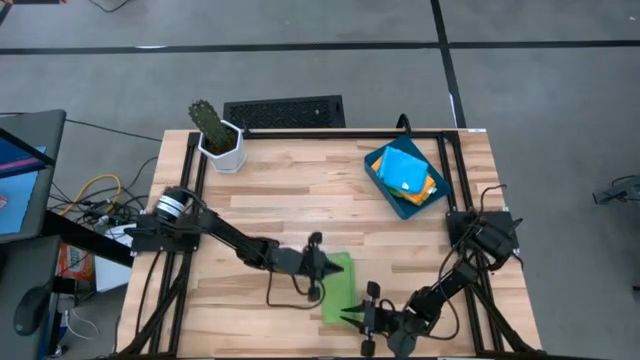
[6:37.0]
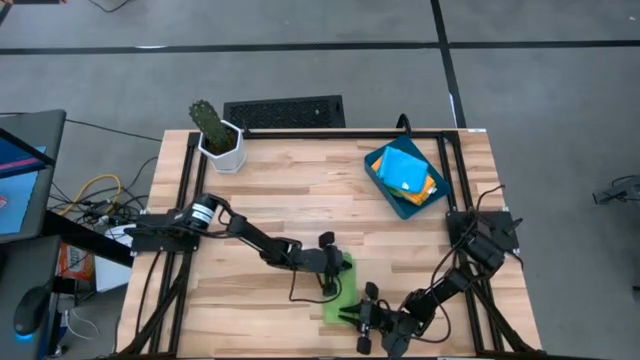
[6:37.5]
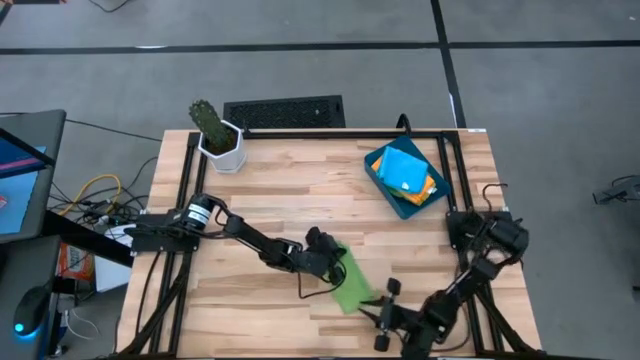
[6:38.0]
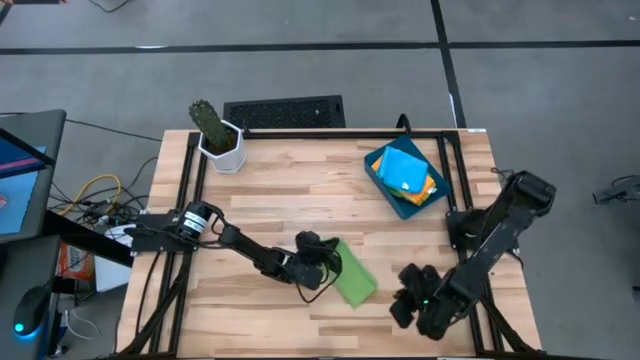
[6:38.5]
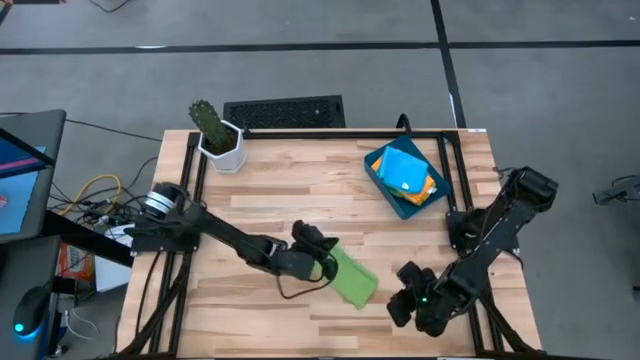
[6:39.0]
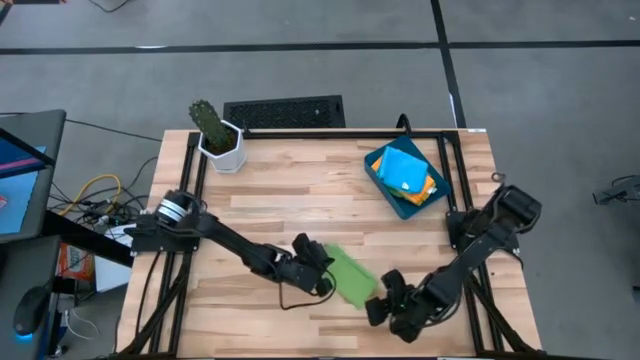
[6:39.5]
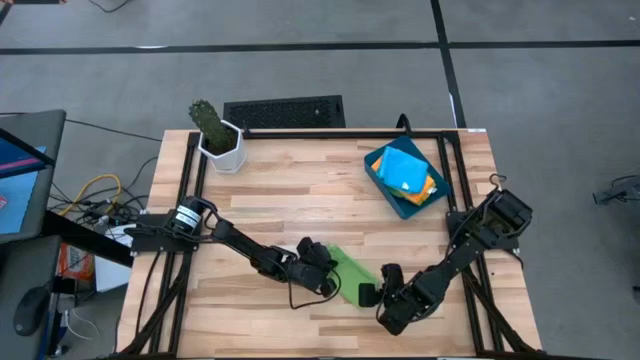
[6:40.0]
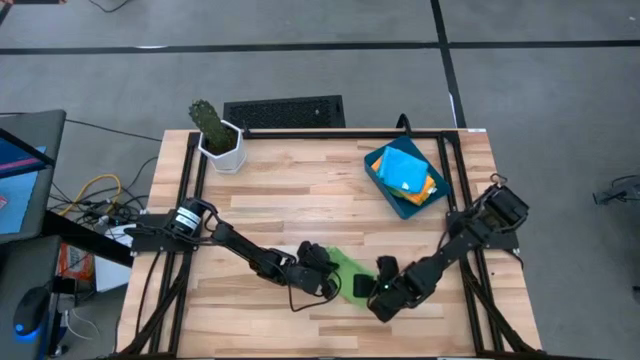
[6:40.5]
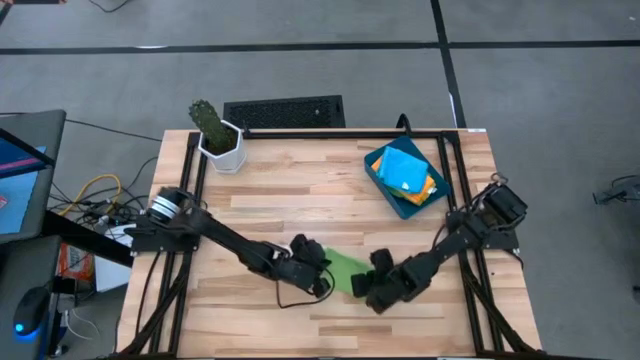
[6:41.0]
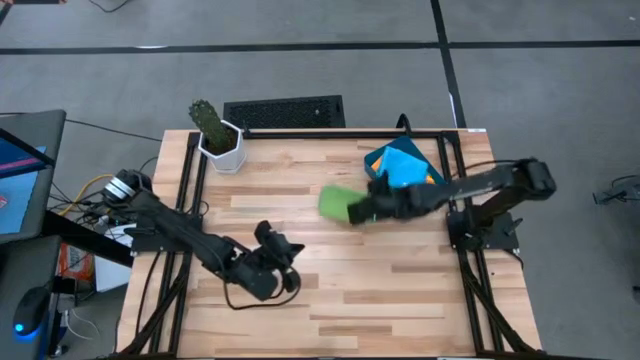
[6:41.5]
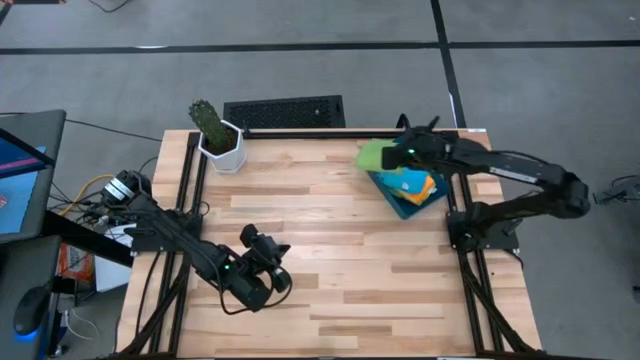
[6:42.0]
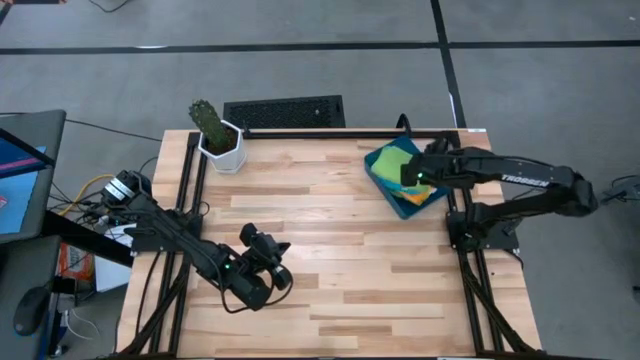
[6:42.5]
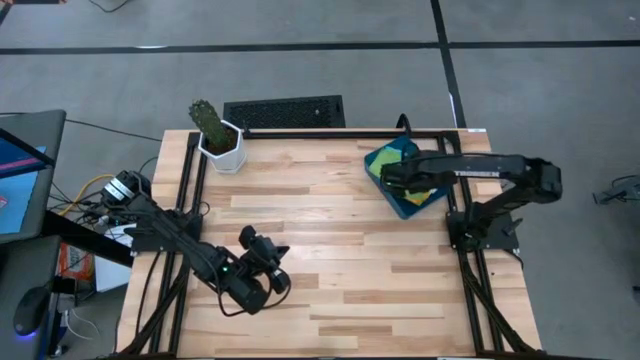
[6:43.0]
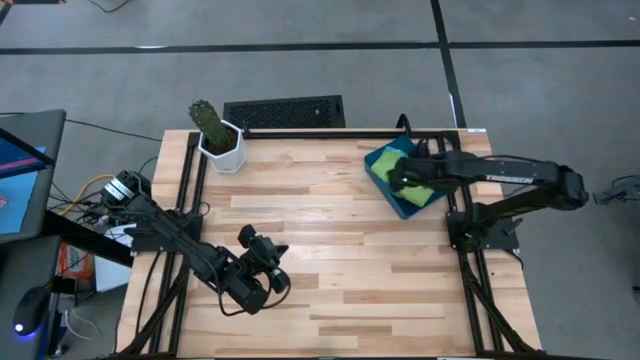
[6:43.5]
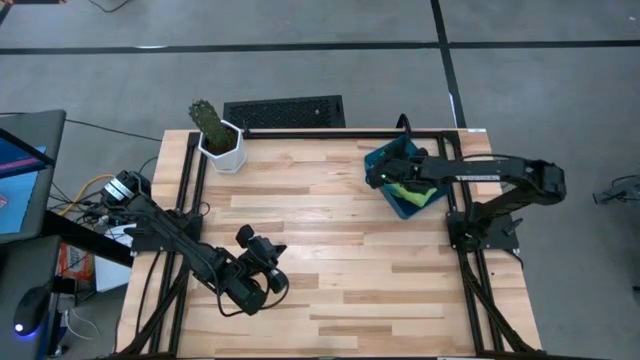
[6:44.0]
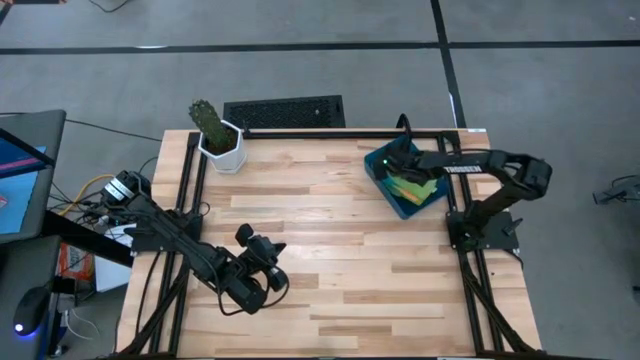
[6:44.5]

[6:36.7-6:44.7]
Task: Fold microfiber towels
Put the green microfiber cloth into the blue bin

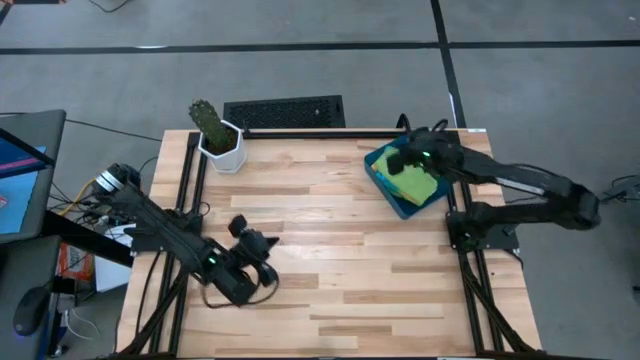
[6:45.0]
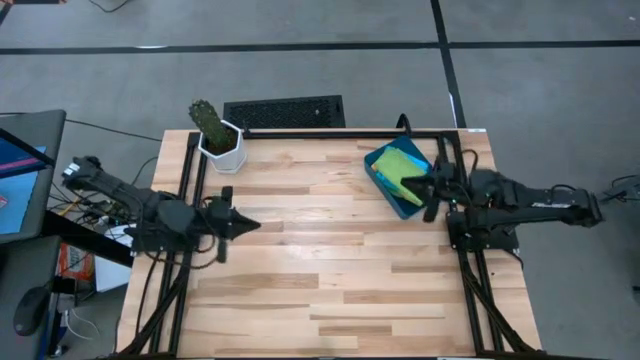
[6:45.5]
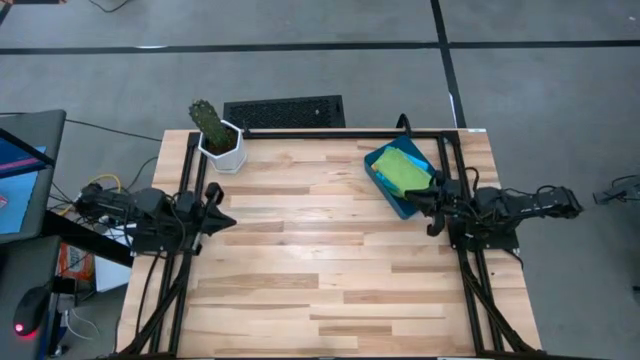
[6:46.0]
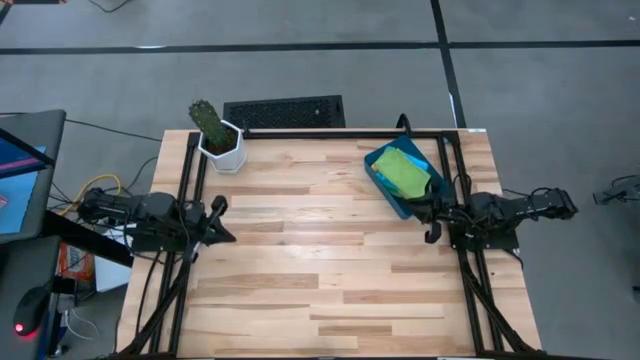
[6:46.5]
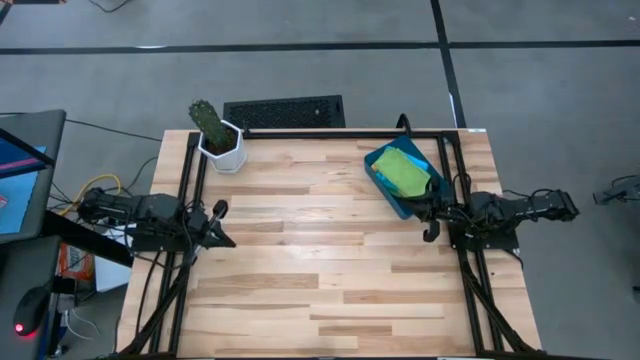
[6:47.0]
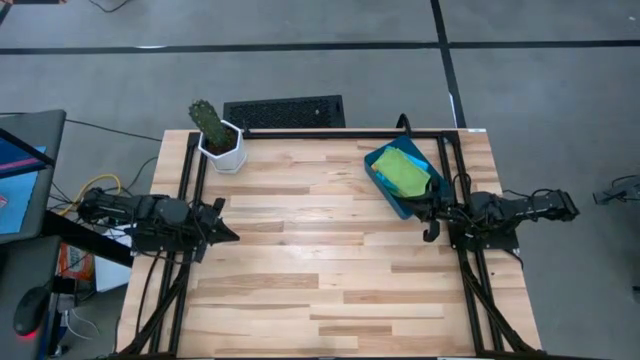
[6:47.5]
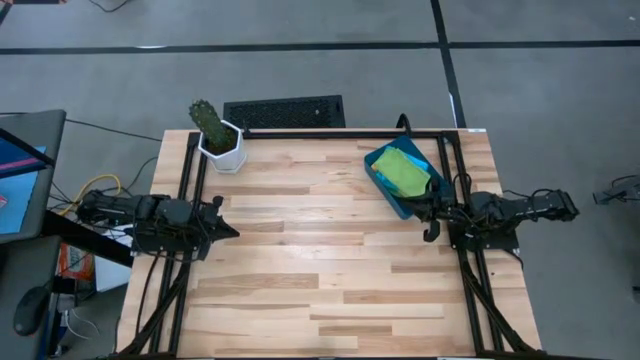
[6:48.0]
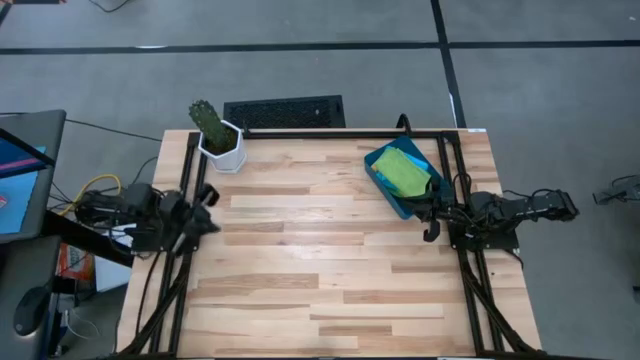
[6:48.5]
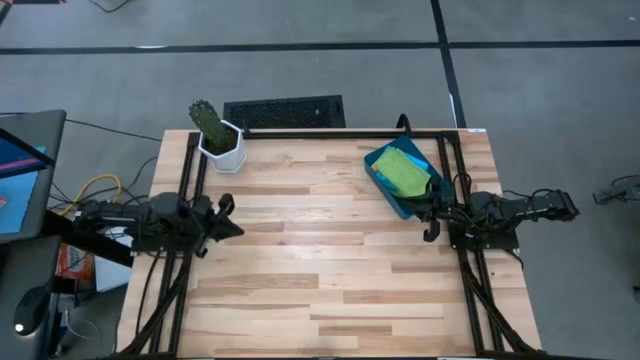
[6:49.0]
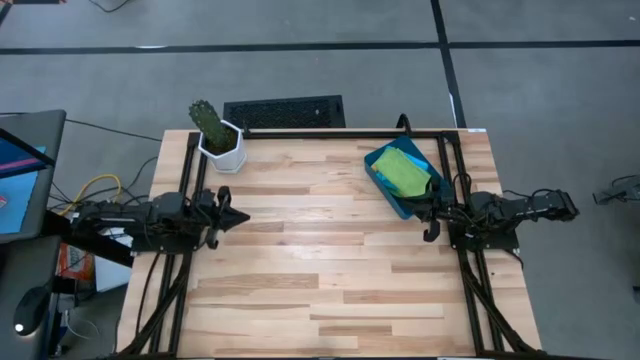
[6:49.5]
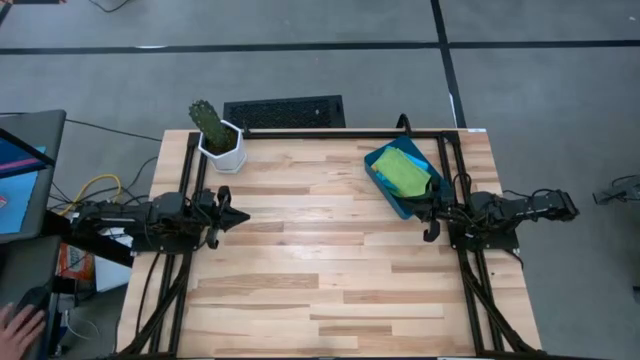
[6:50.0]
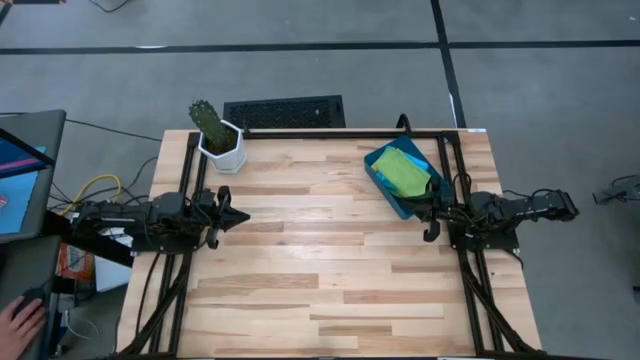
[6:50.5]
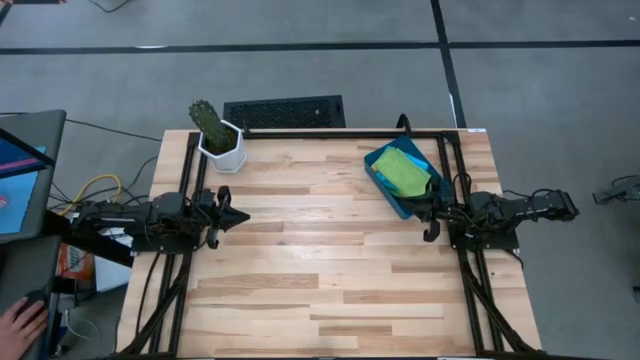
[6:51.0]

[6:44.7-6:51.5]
Return to Home Position

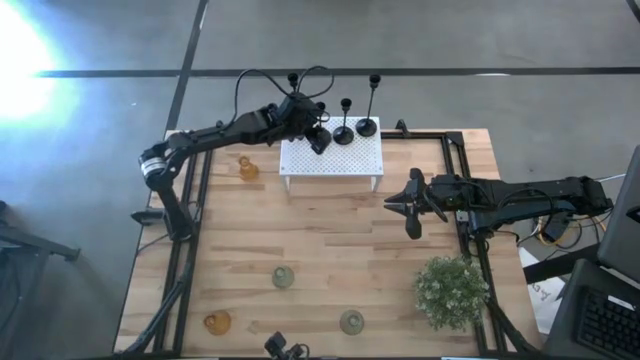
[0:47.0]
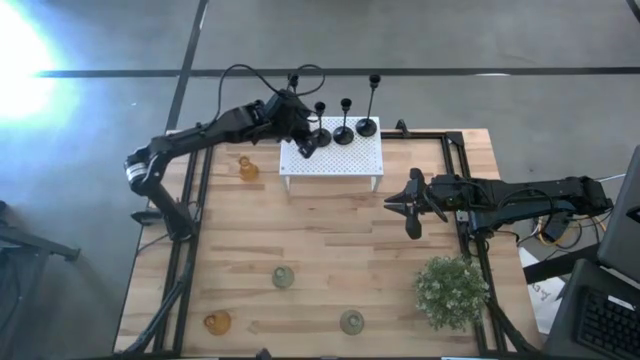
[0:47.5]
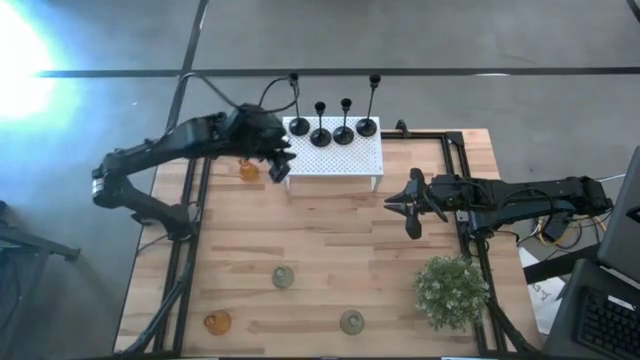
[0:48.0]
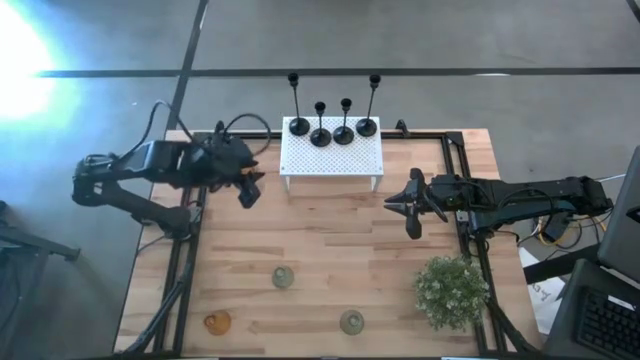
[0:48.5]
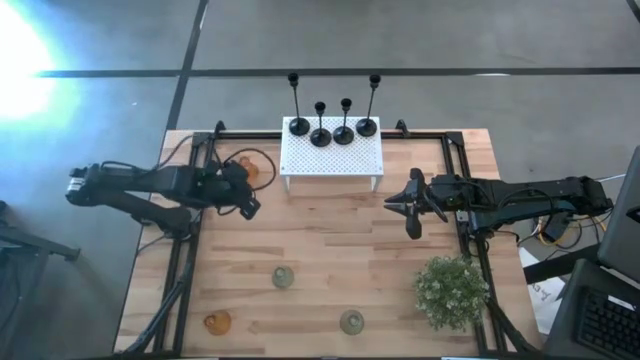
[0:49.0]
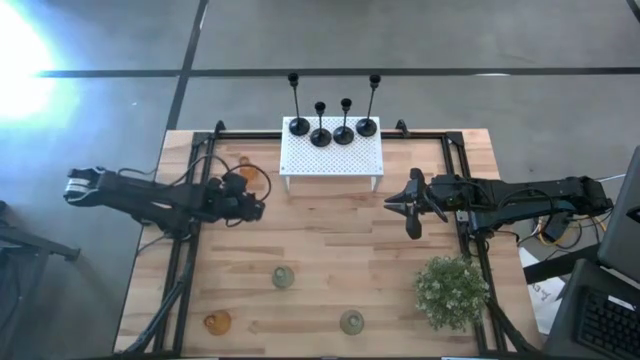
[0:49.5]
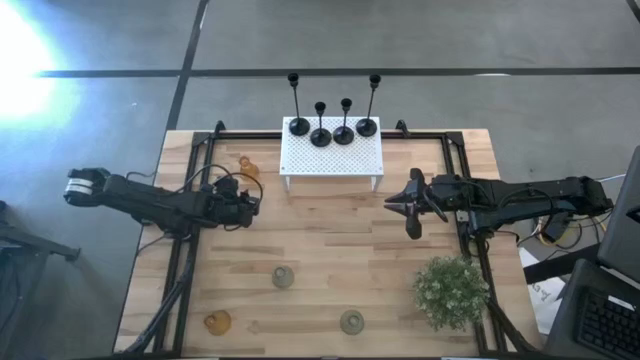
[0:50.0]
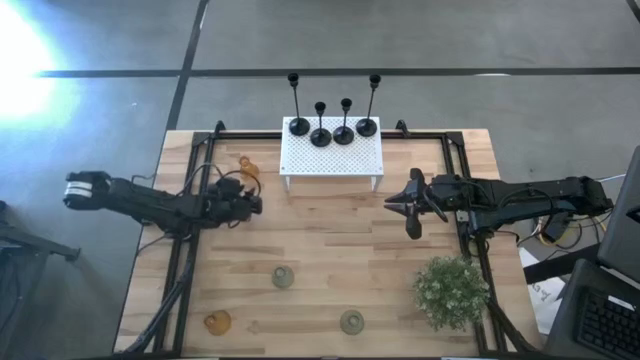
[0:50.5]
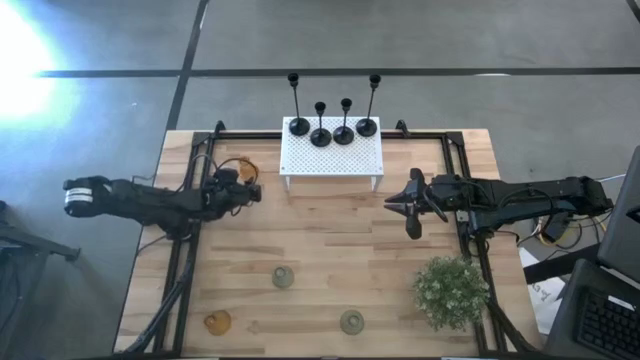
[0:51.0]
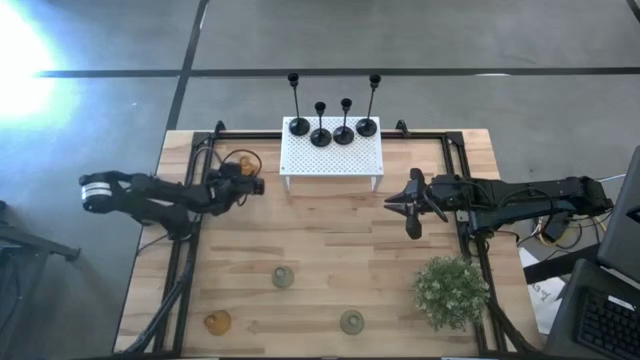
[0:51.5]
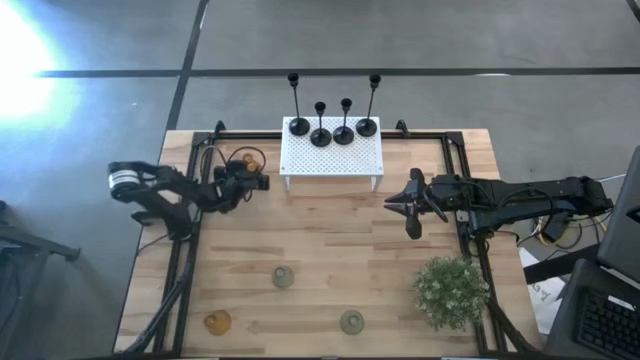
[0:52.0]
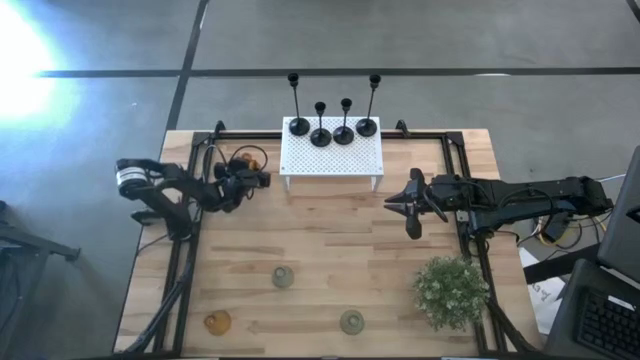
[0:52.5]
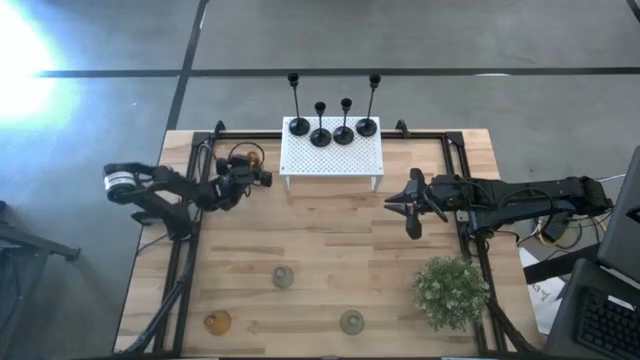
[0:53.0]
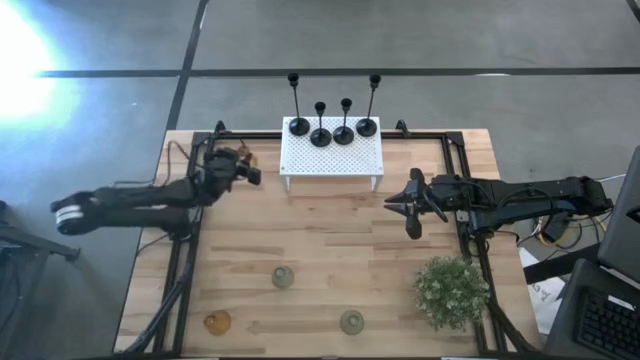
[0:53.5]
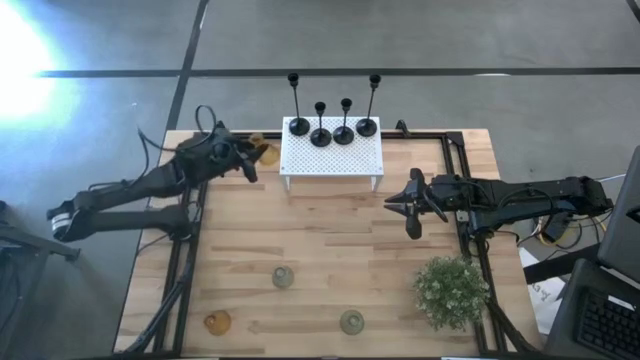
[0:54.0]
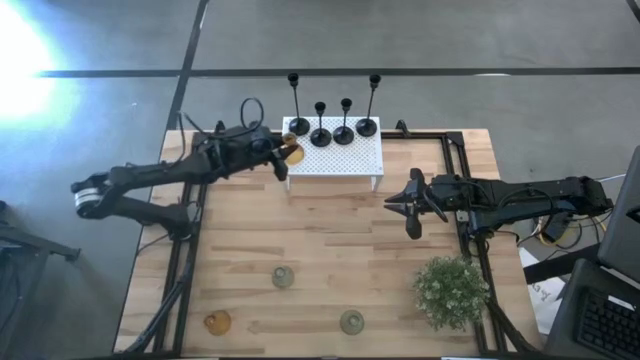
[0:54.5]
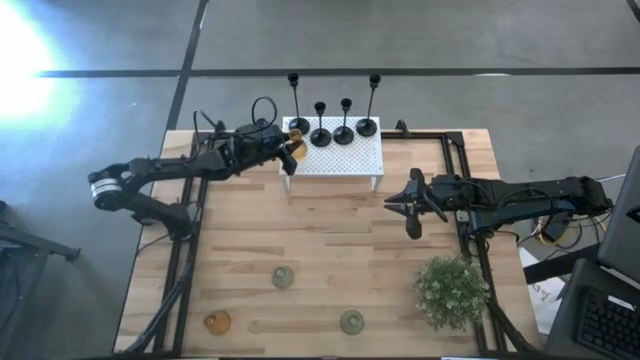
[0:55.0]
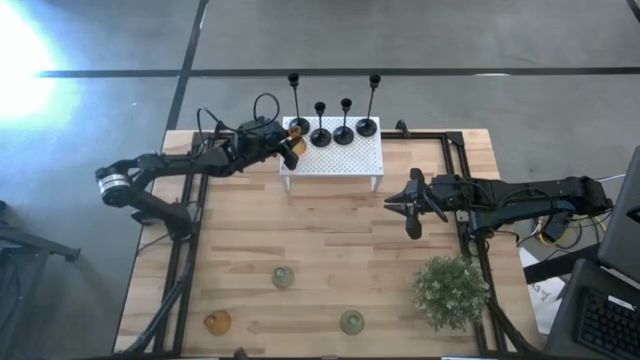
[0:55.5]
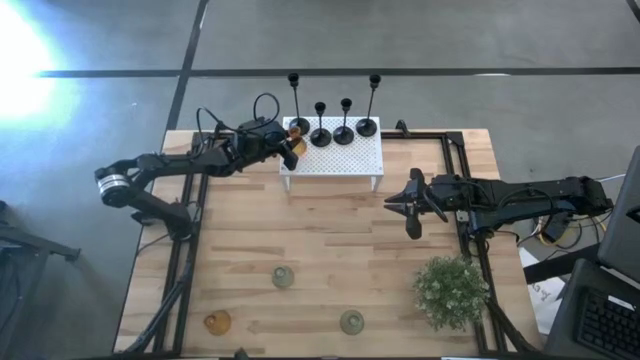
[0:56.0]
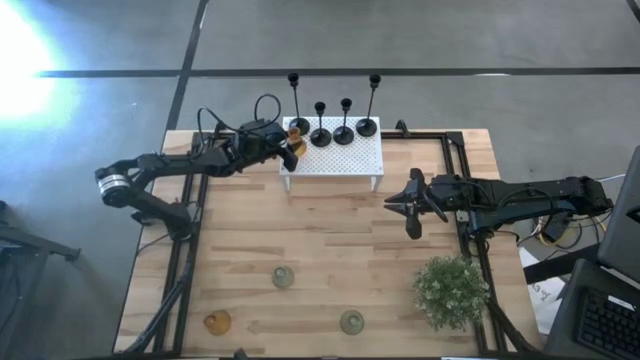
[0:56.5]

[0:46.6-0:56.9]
Task: Pick & Place candle stick holders
Put the top yellow glass candle holder on the shelf
